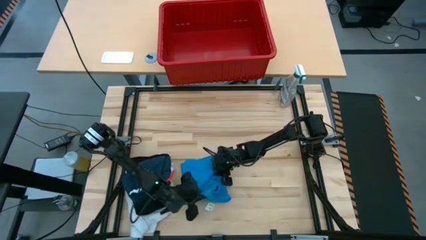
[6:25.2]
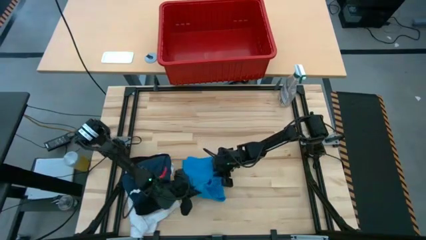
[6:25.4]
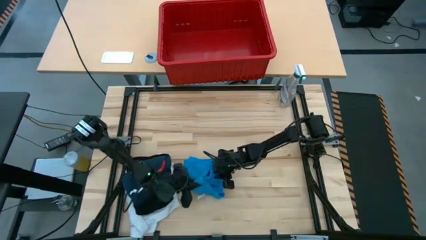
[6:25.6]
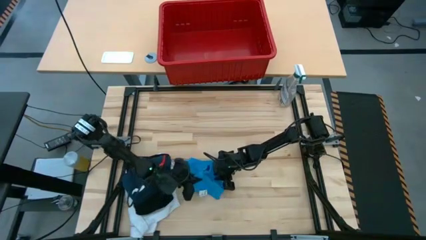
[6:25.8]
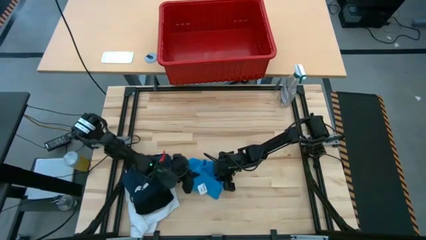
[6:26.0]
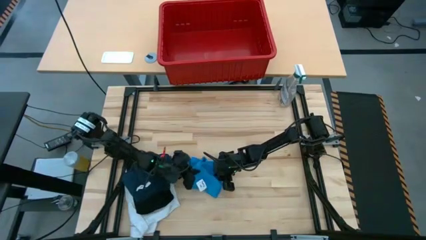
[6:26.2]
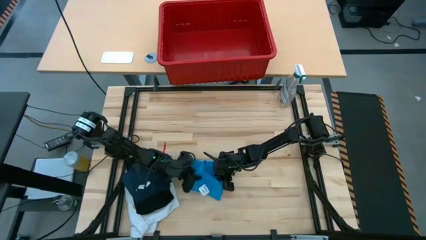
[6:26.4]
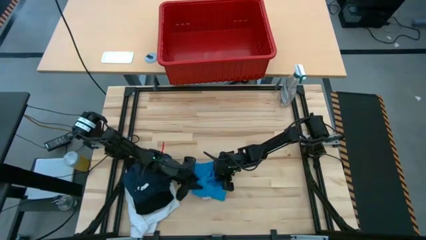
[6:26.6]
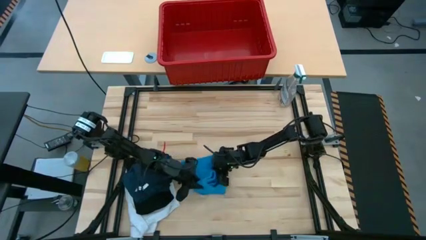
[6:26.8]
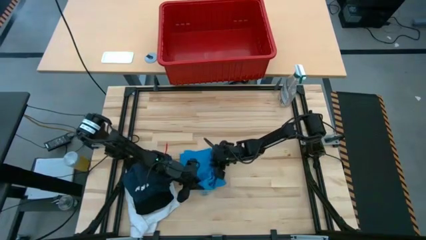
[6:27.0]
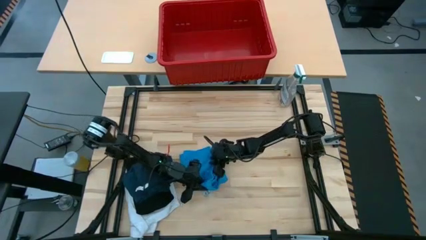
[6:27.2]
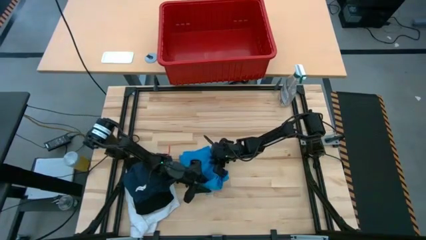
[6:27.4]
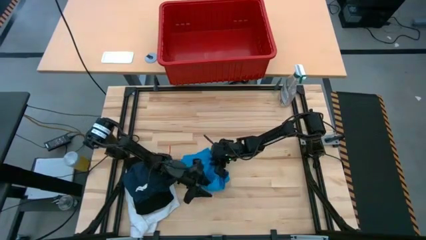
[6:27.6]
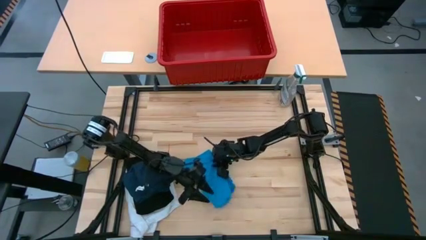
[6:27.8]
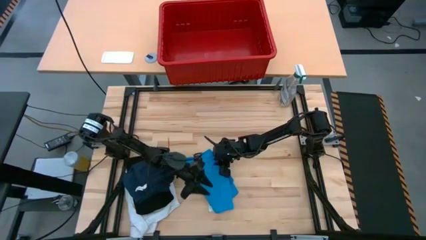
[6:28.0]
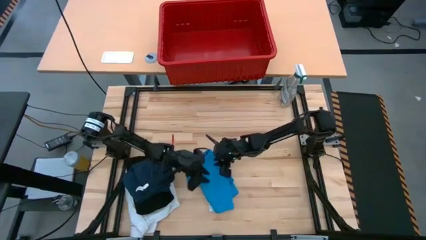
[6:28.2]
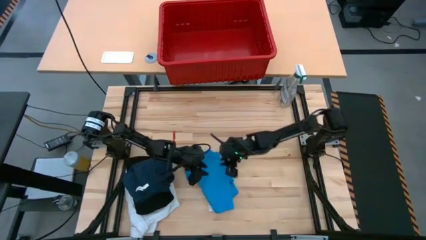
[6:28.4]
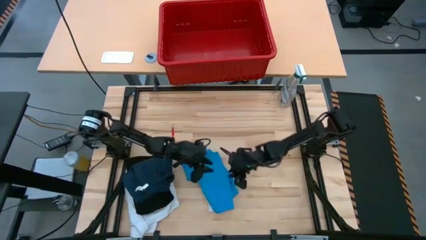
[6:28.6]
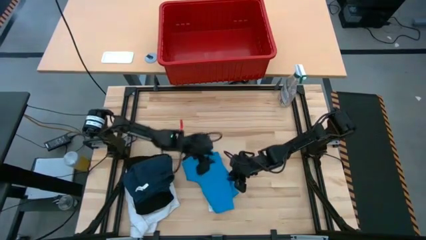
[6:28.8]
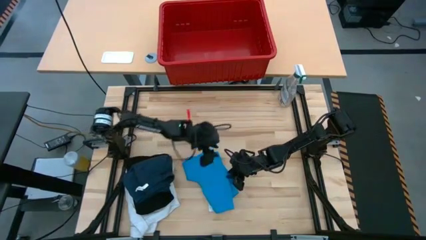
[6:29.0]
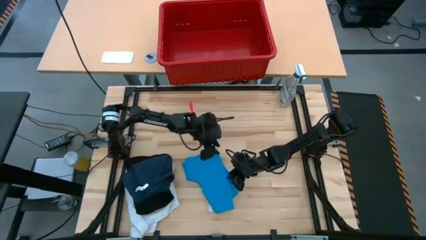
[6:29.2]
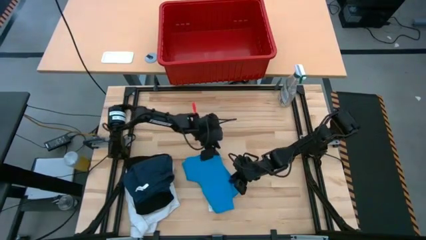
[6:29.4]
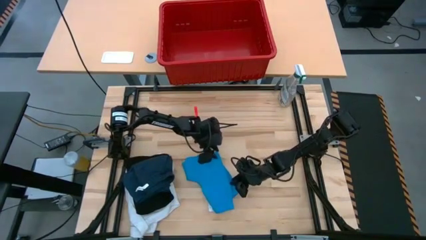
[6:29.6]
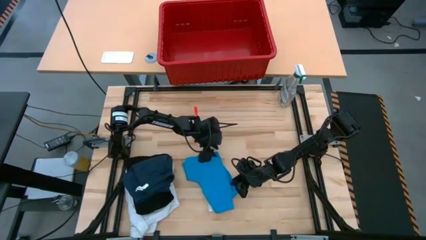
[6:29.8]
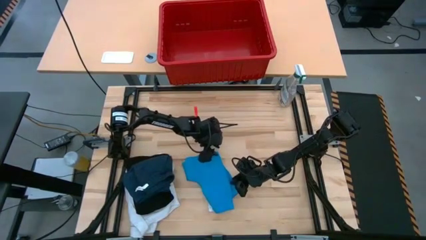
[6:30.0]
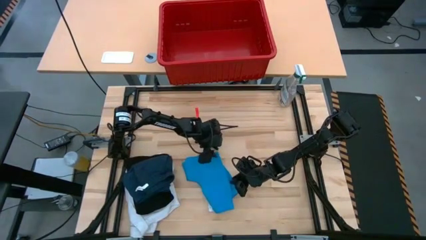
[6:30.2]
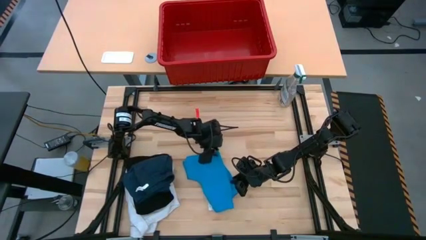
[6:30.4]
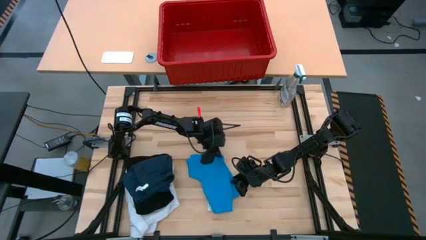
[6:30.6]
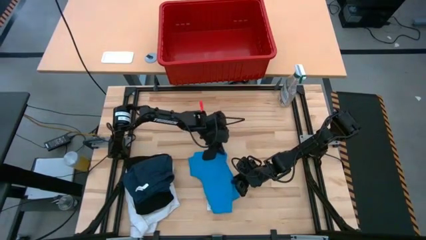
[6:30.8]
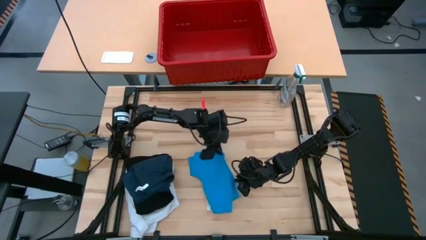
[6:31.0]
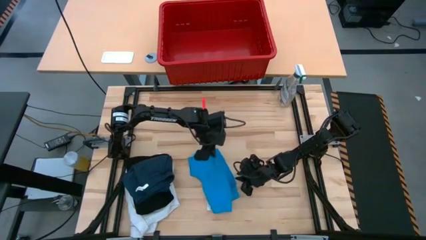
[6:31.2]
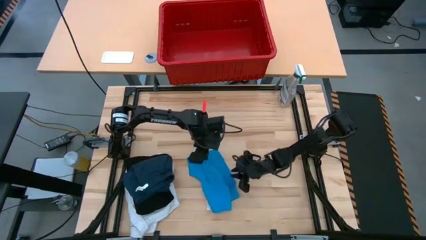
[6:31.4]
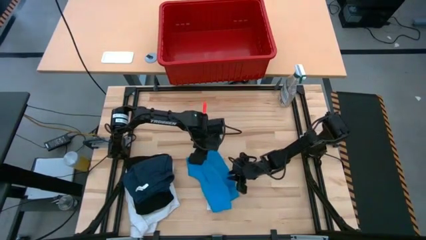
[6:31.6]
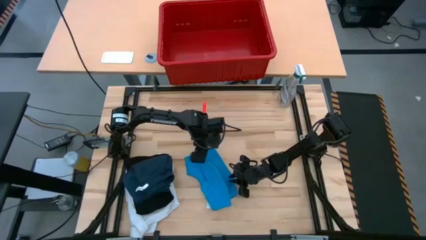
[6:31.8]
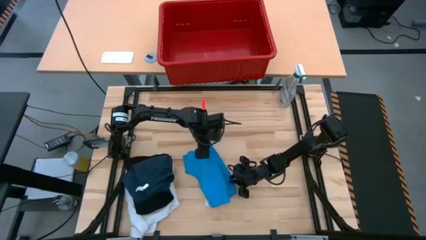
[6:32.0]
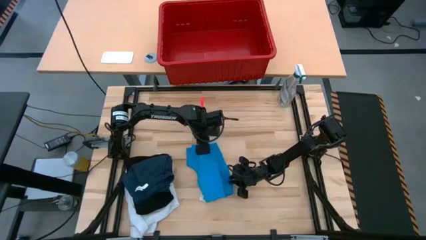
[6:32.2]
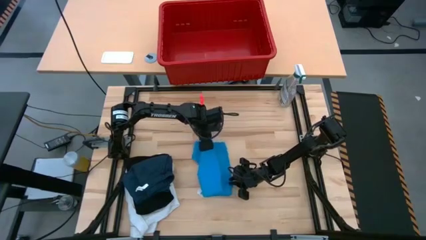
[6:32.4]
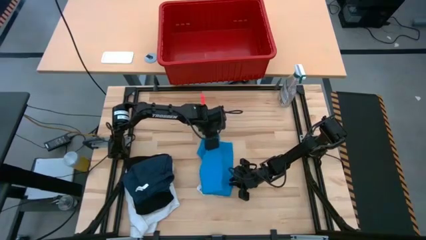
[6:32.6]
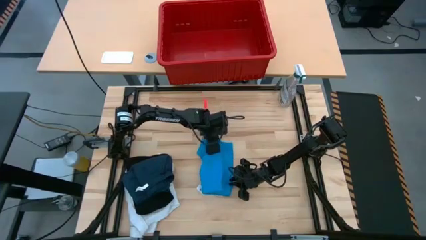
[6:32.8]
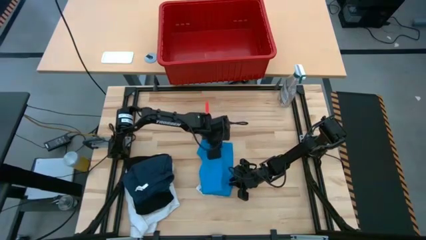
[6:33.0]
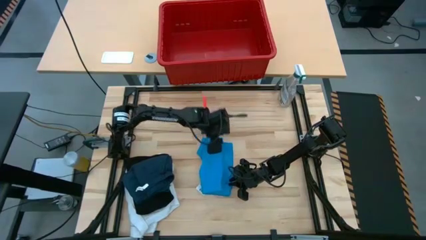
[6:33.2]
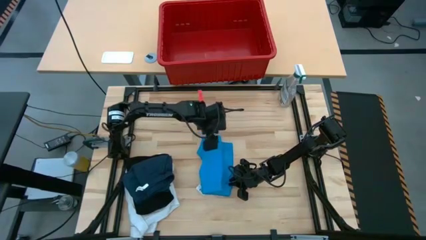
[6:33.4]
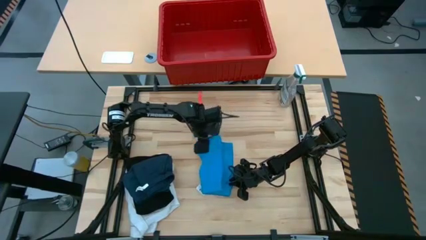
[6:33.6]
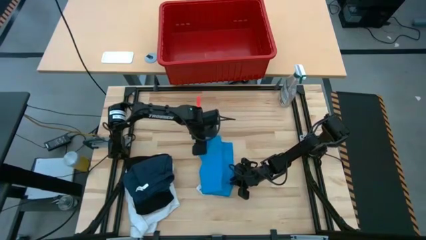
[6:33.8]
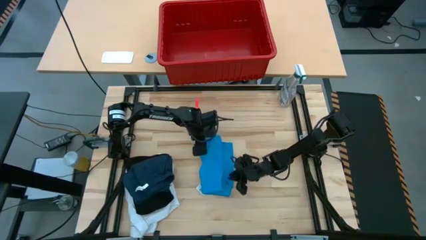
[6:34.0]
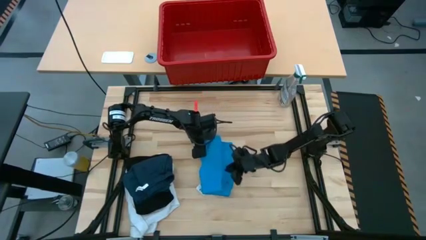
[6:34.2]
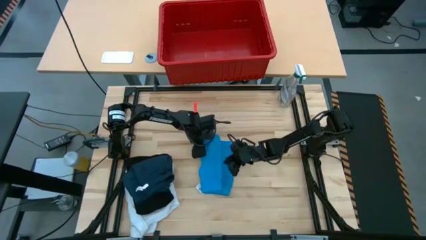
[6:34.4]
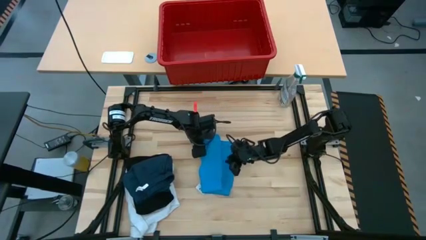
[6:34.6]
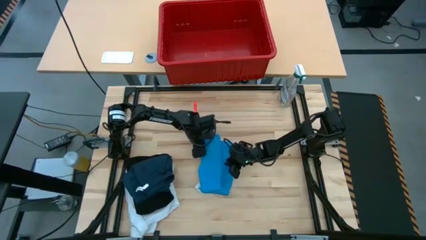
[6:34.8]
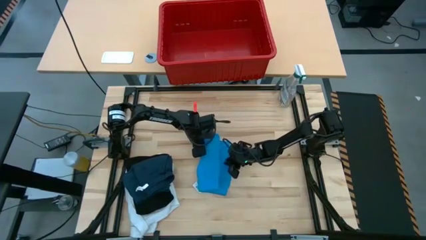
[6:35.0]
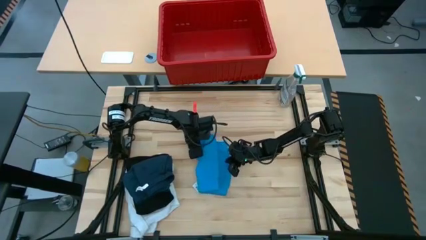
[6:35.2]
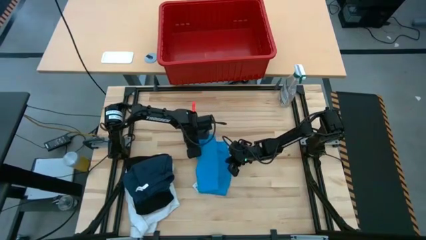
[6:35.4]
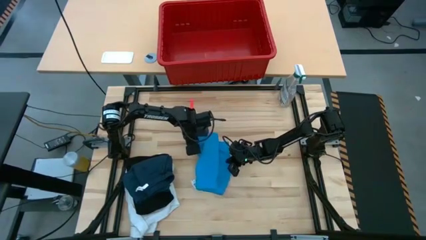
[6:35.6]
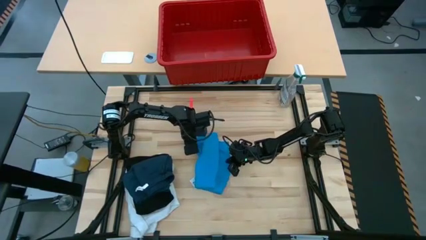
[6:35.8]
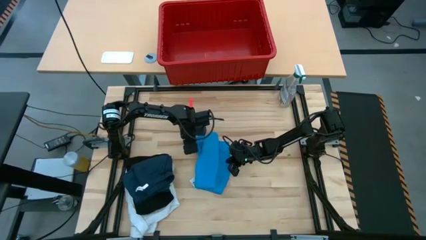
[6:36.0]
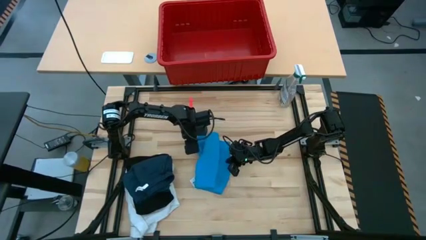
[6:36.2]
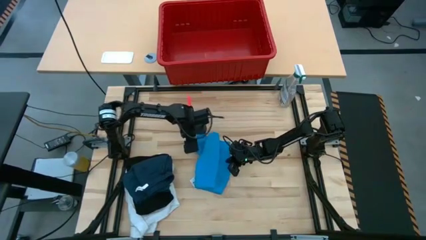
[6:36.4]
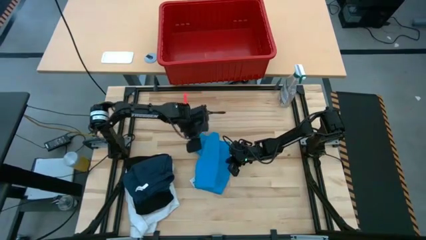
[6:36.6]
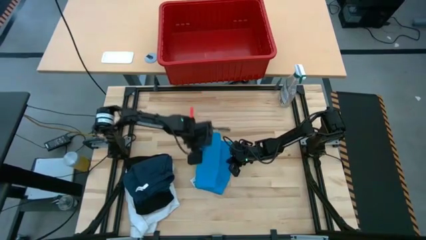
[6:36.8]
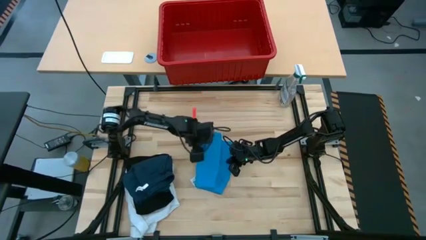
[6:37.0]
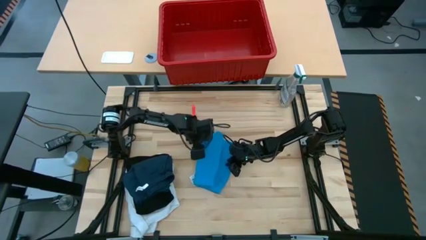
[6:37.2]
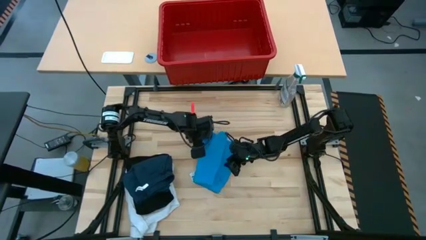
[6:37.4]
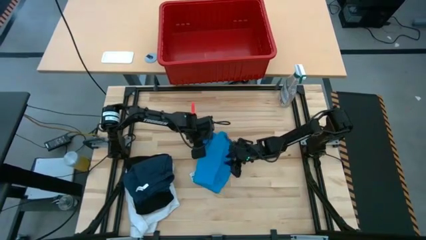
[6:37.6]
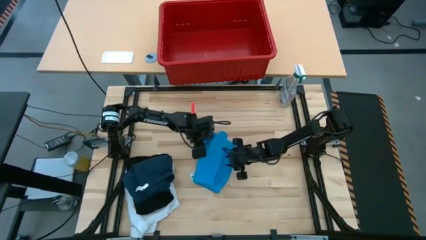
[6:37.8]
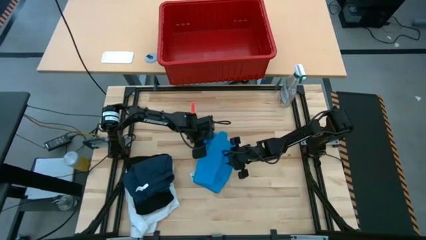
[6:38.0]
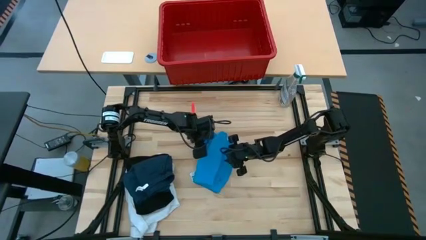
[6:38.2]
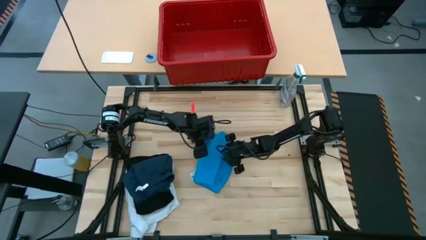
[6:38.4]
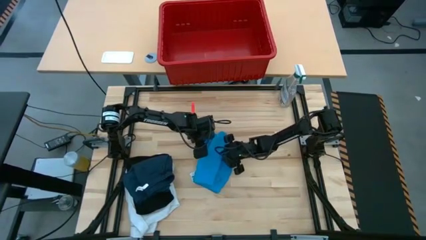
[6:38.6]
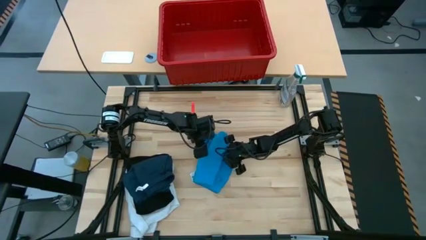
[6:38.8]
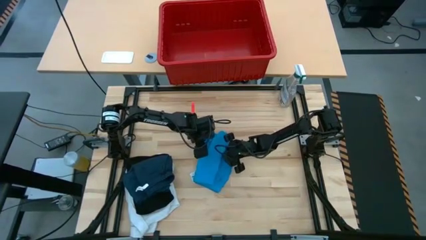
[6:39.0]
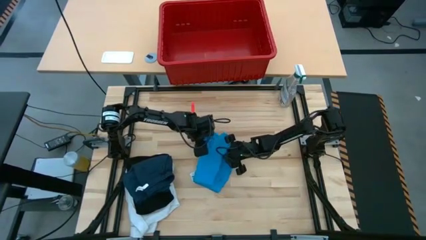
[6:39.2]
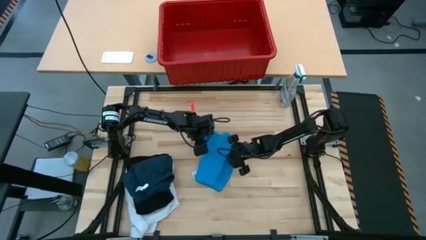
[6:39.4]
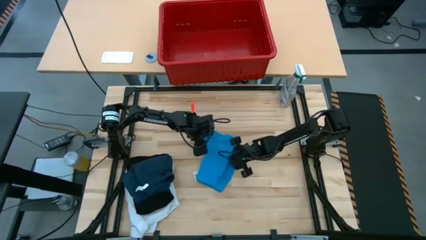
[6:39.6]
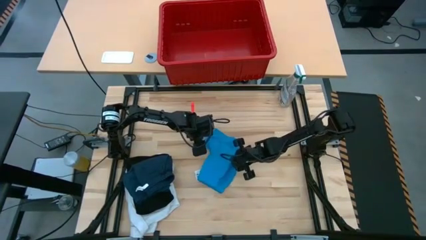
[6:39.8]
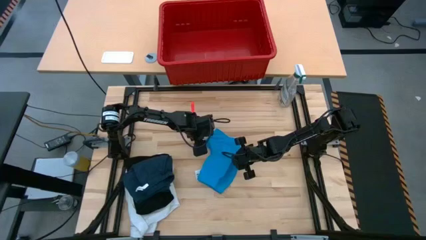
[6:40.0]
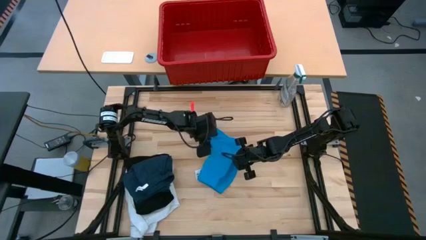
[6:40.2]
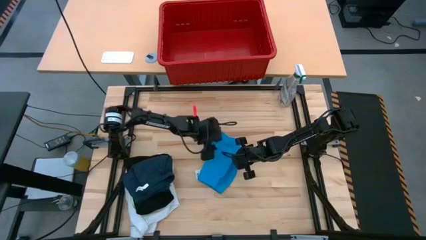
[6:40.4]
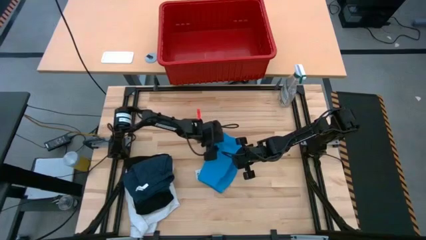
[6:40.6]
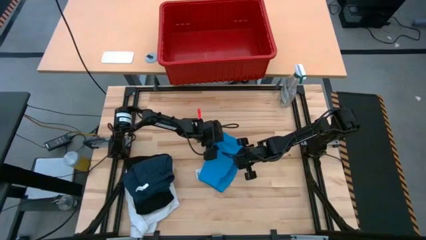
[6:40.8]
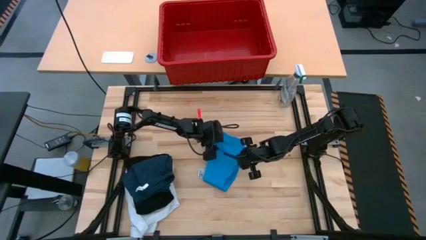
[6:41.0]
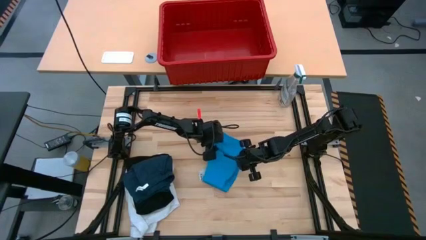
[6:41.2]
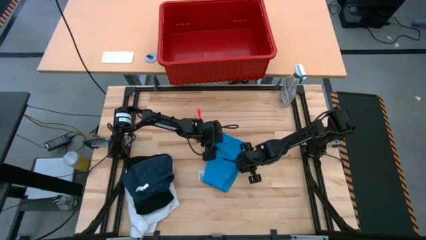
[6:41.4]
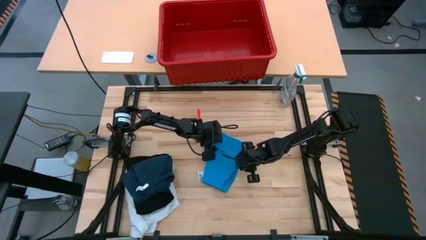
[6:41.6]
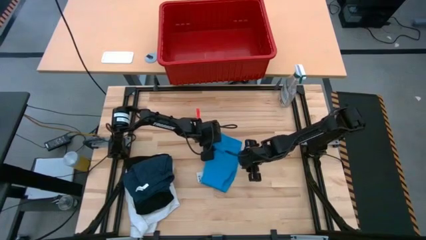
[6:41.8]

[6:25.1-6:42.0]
Task: Fold Laundry from Bin
Fold the blue shorts
